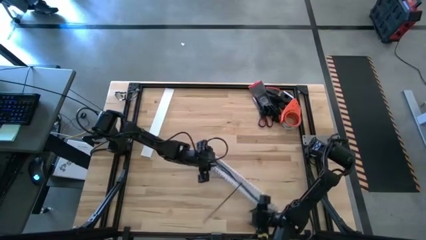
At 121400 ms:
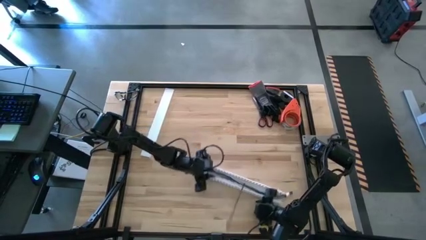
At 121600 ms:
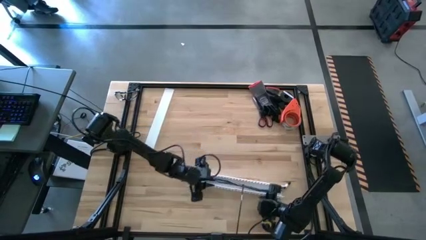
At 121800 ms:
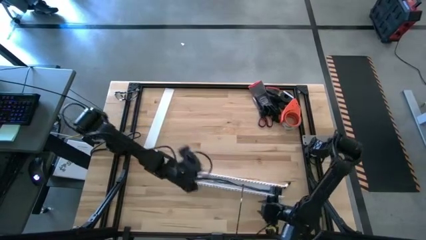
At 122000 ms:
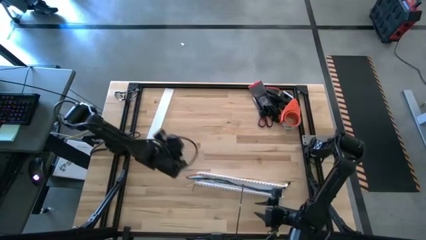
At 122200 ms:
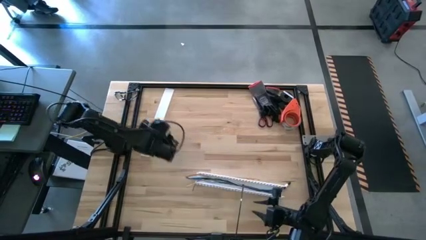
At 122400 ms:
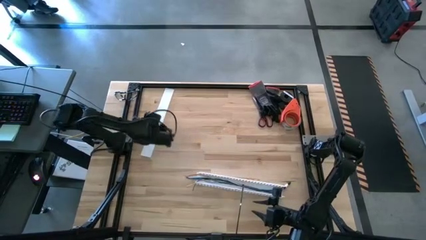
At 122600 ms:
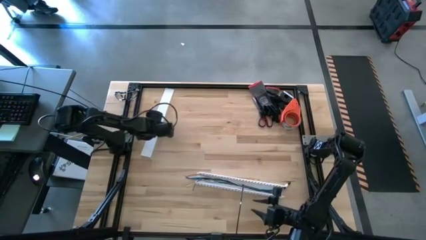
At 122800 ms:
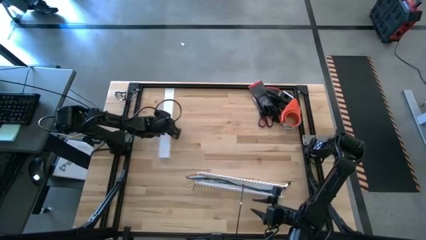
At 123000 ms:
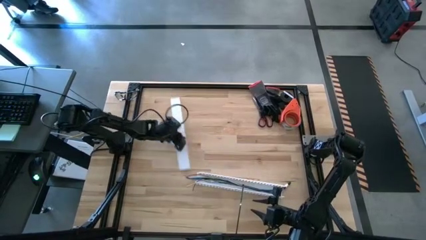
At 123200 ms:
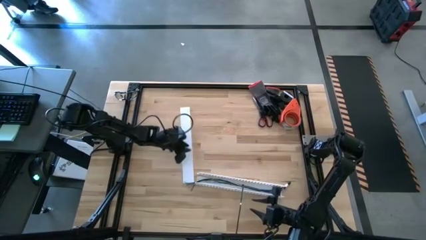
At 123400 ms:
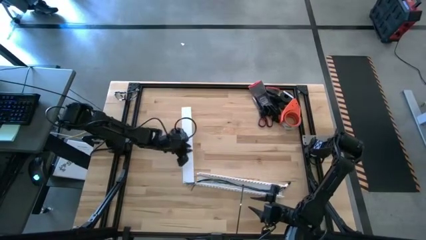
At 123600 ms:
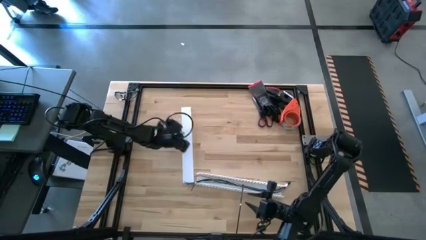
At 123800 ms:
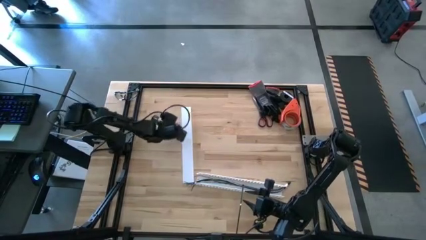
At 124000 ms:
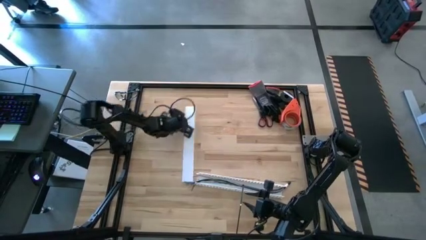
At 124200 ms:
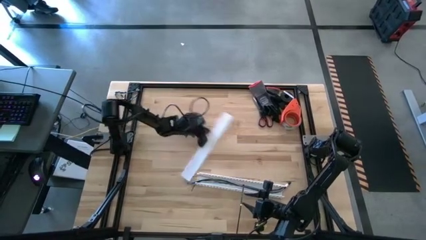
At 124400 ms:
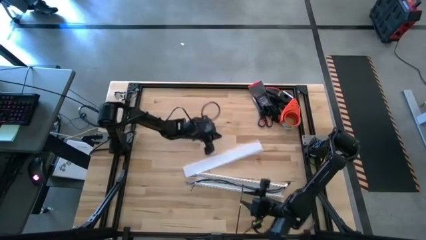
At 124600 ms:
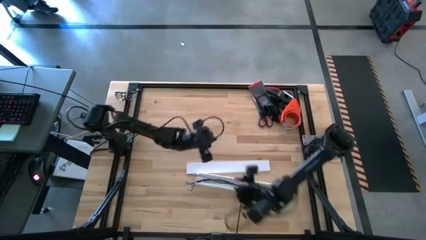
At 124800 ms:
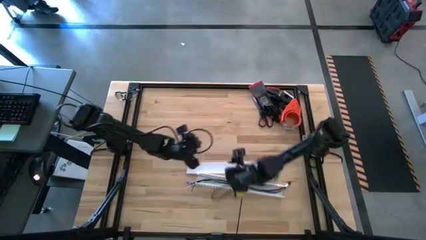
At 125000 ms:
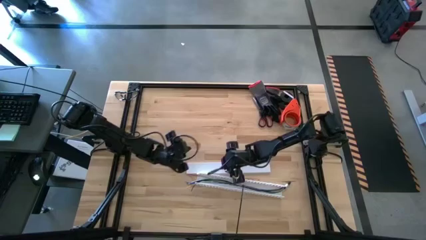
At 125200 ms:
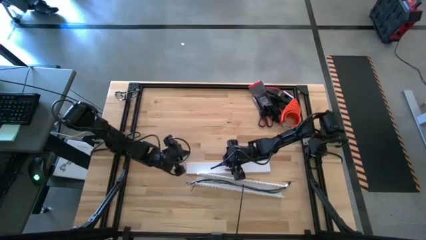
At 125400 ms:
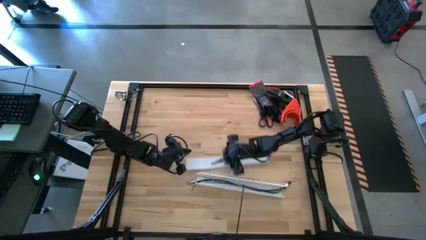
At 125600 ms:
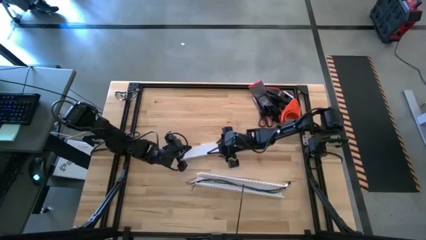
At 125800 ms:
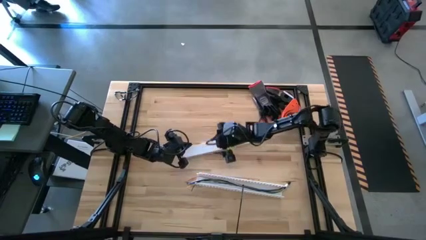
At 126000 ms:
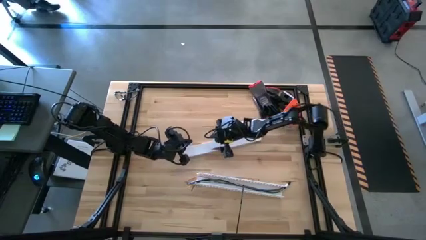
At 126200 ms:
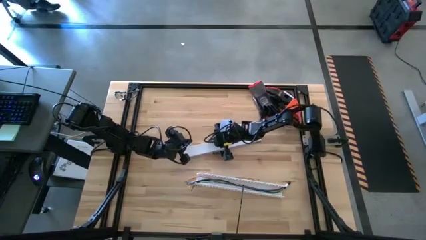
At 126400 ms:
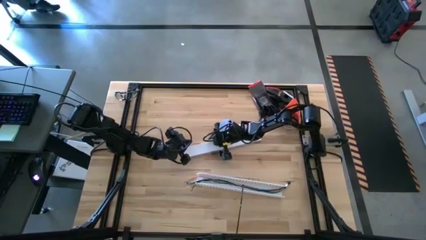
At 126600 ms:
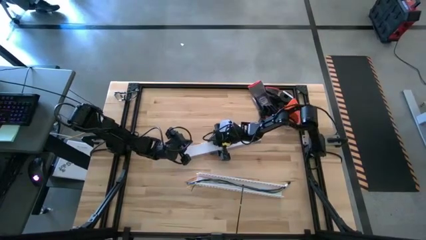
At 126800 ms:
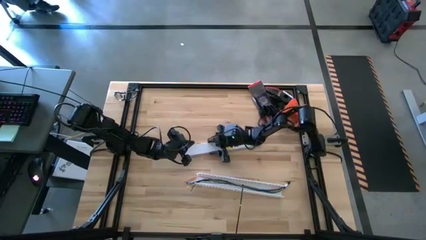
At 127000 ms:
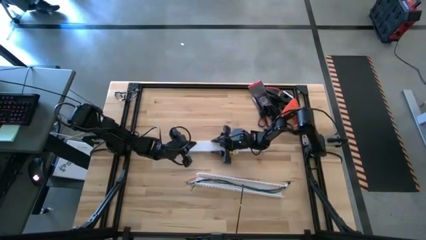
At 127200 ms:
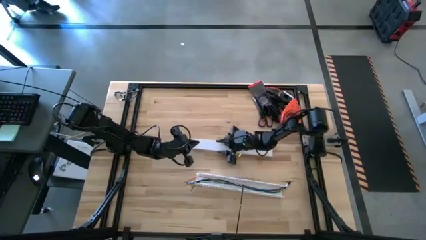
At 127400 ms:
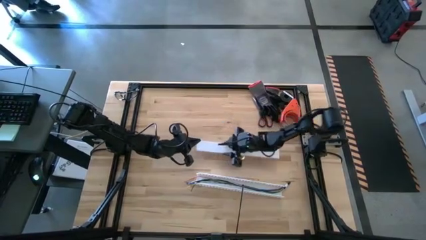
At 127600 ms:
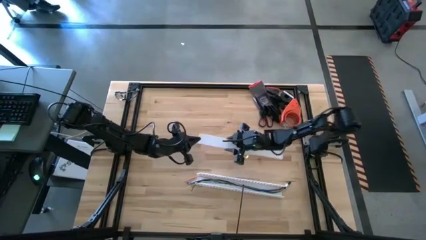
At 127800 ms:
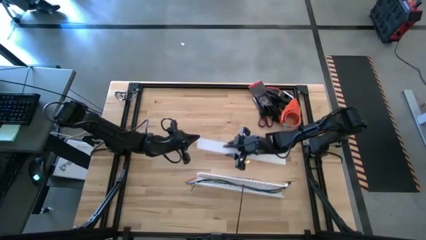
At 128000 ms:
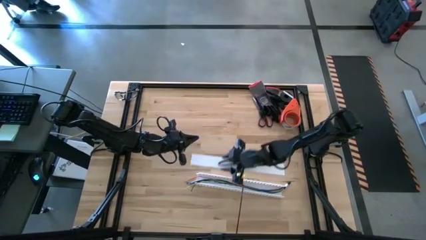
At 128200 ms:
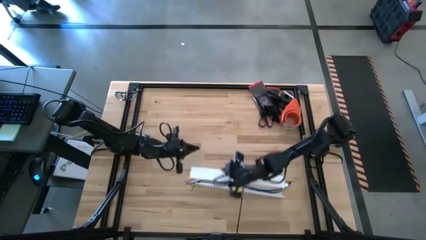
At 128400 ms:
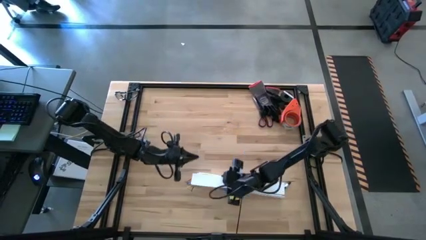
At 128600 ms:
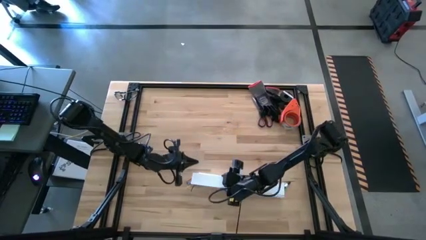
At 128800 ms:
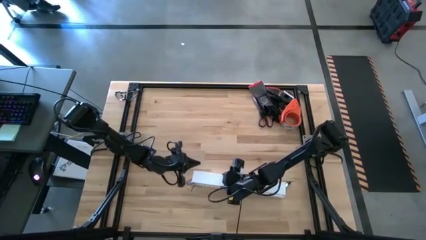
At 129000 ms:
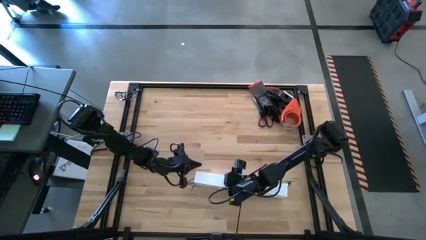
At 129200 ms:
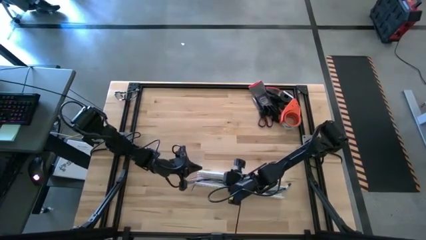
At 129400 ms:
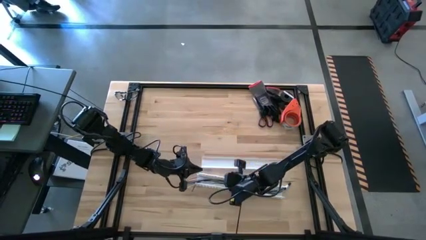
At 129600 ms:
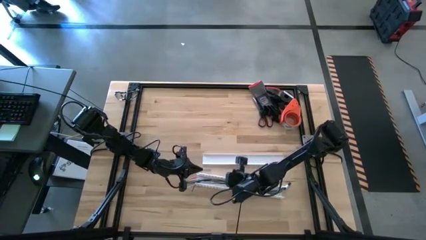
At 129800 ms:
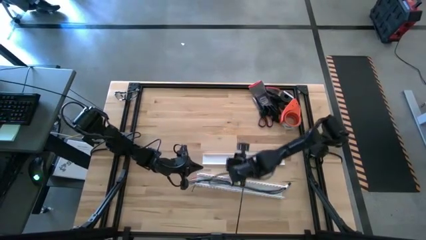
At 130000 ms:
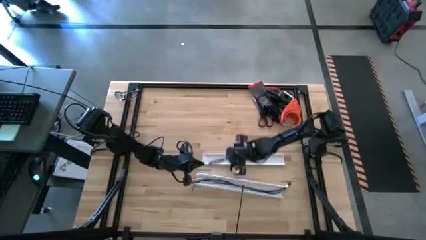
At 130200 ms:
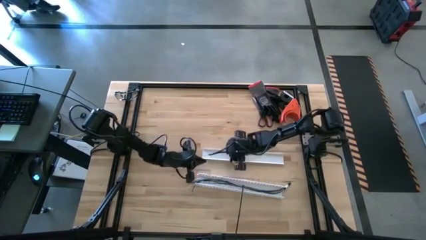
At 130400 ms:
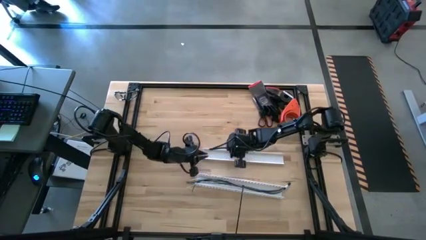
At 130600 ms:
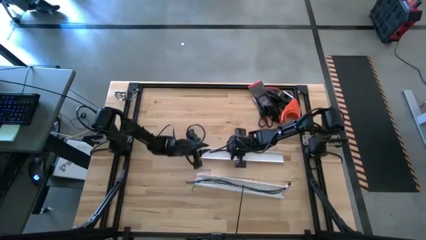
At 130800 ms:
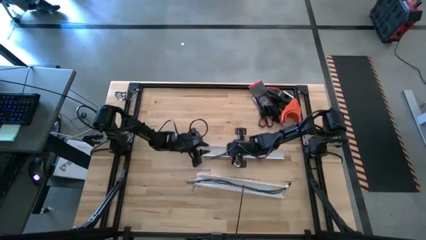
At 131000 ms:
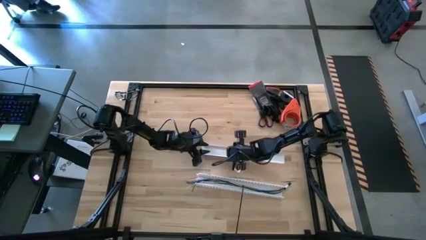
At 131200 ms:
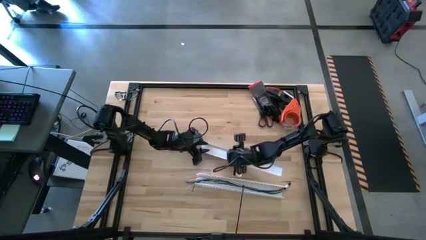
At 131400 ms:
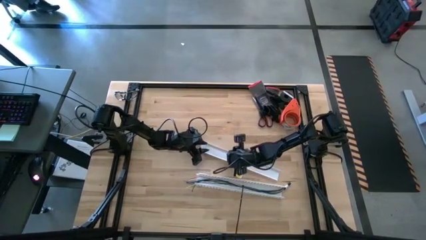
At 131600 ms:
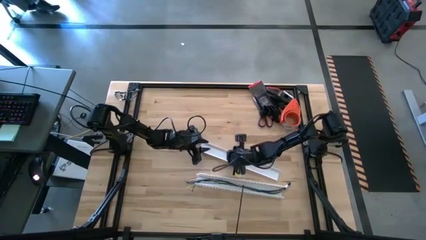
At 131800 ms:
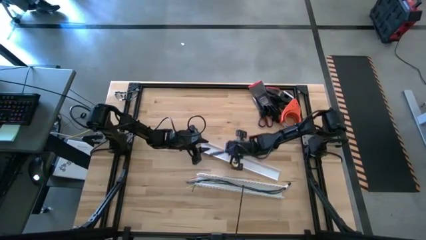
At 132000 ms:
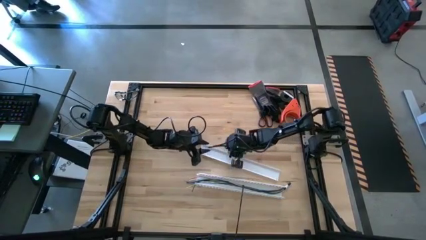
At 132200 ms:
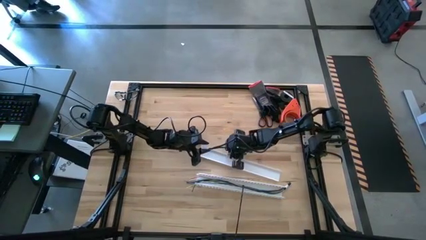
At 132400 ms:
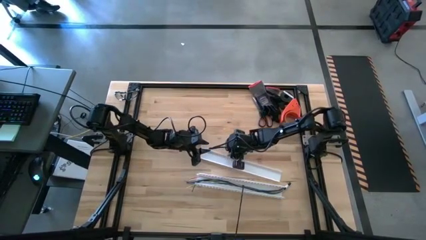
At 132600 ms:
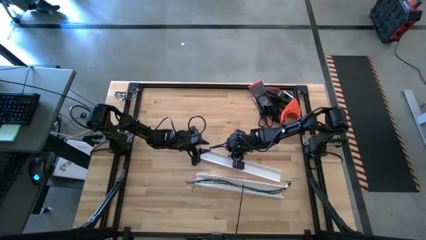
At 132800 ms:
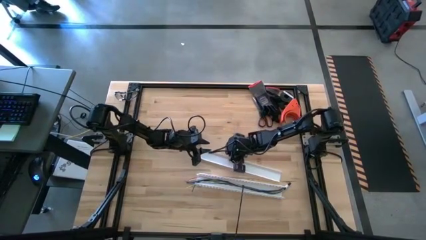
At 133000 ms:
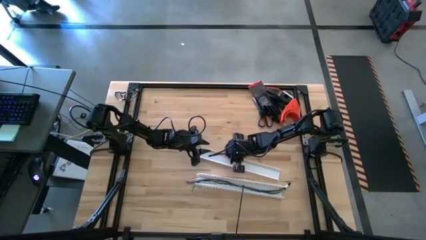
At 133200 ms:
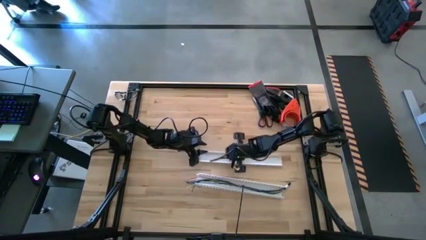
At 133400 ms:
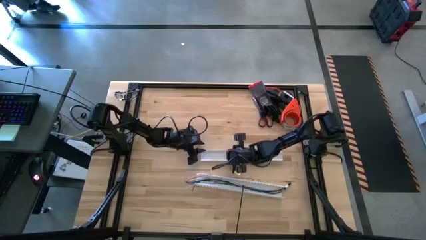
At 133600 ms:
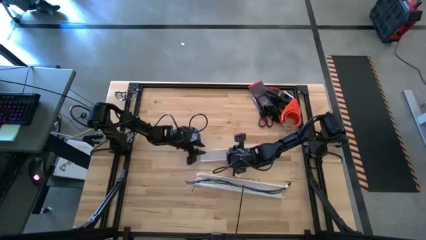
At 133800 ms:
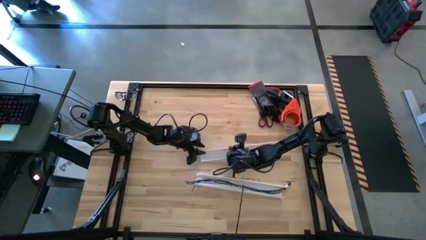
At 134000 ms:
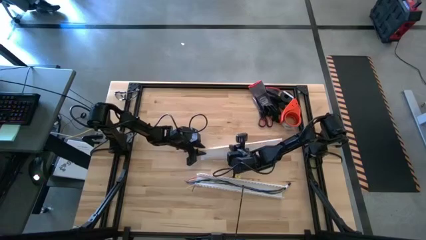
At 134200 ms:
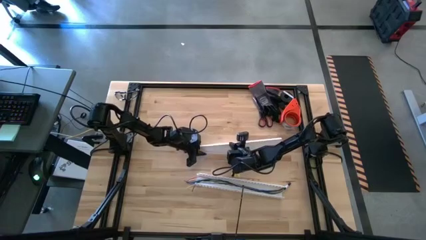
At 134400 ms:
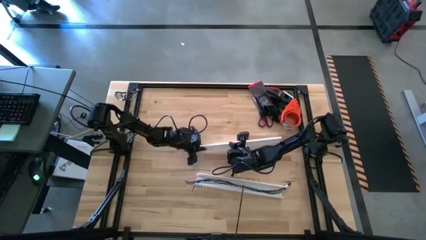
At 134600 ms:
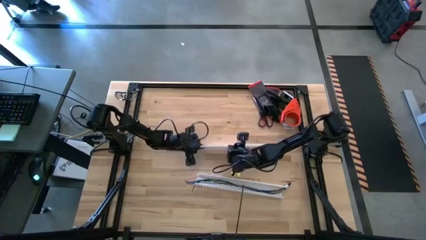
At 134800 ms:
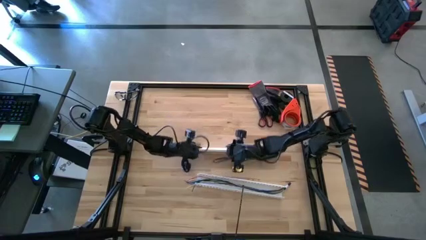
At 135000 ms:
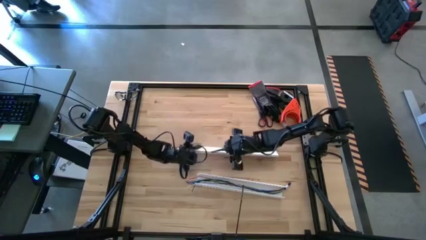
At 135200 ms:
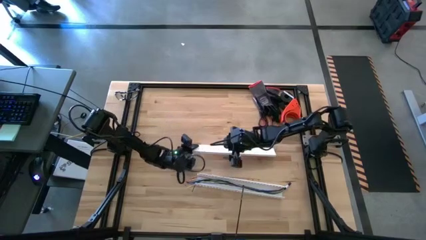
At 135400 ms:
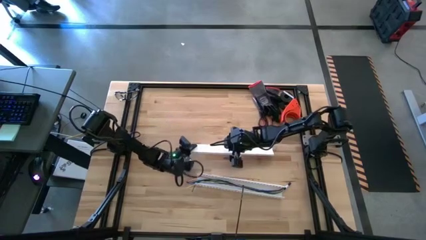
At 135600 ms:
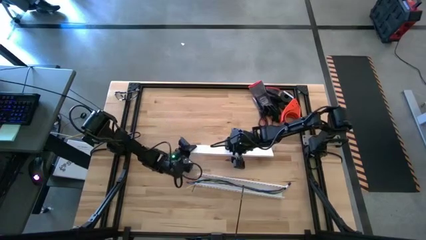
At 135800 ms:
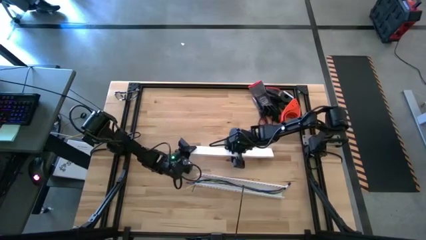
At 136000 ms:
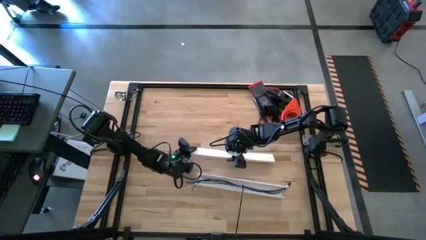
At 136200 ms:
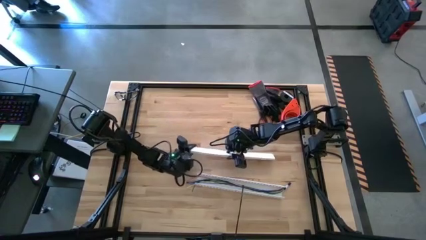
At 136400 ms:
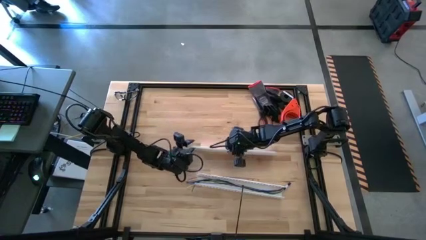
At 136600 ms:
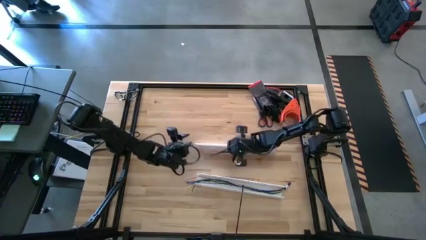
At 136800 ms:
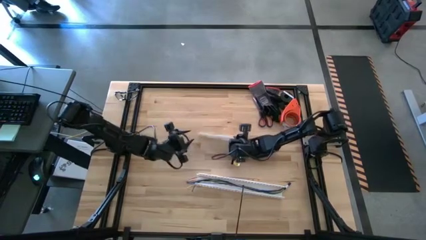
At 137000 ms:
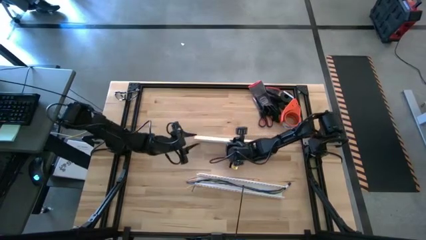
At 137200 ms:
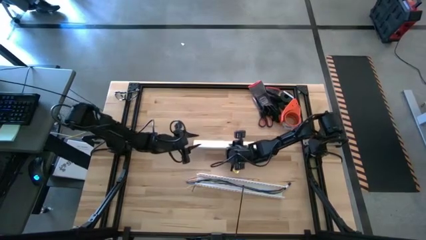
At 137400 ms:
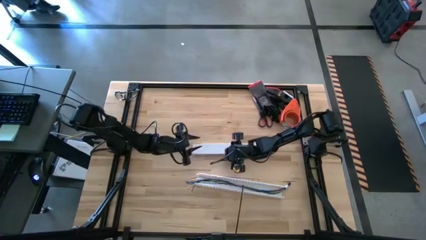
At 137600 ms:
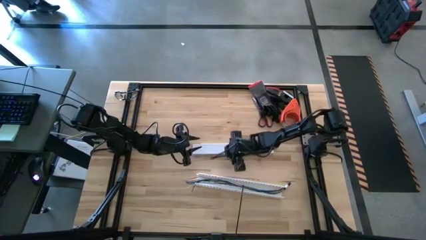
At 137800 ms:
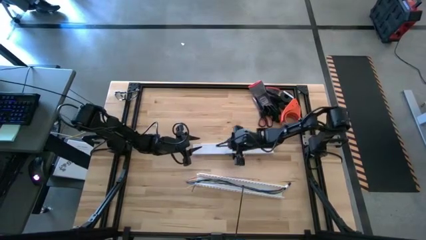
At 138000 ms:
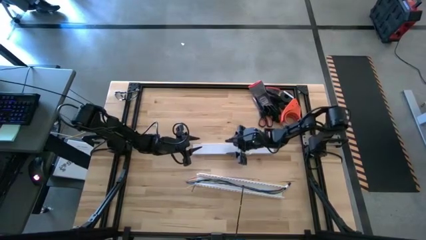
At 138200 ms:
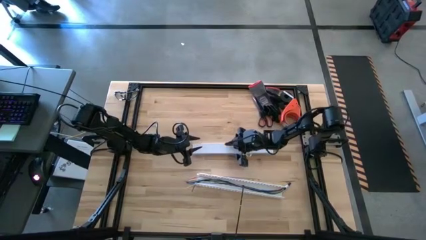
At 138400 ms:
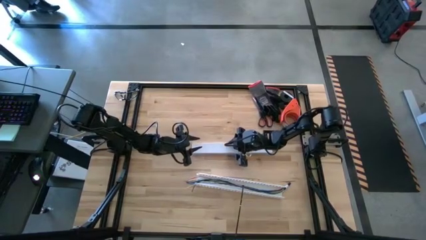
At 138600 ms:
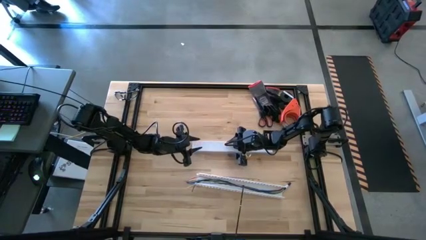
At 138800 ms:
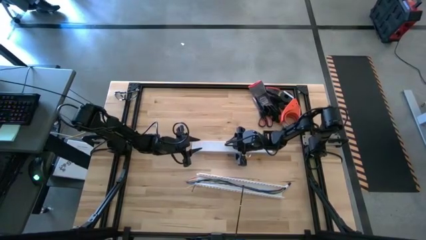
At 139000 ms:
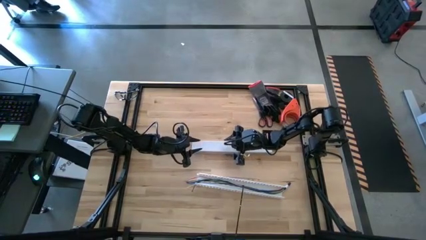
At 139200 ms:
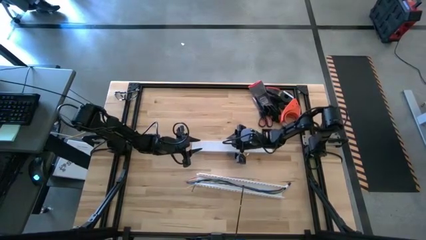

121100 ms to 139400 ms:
Task: Ziptie cables
Close the white cable duct
